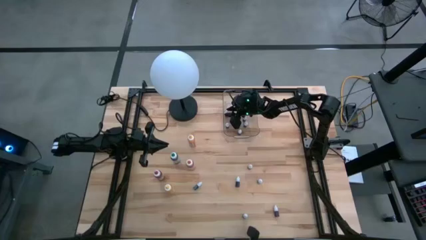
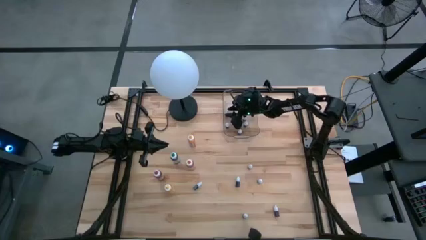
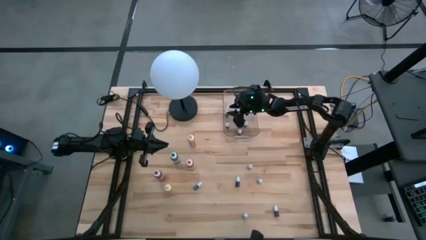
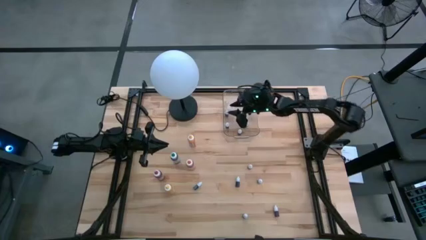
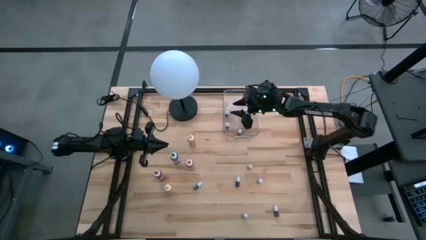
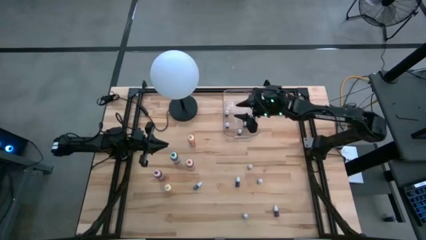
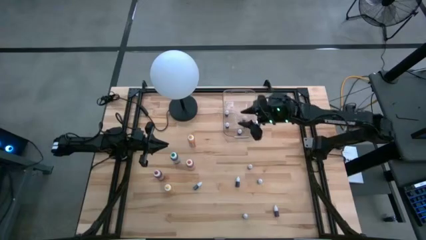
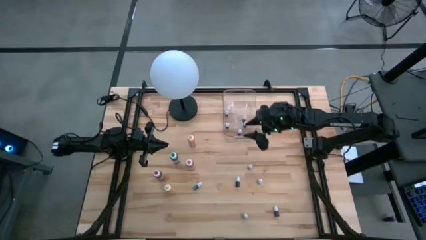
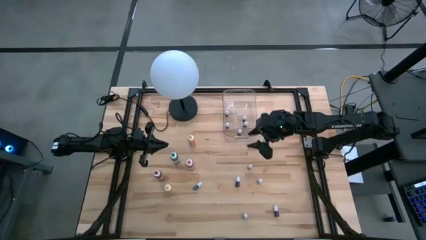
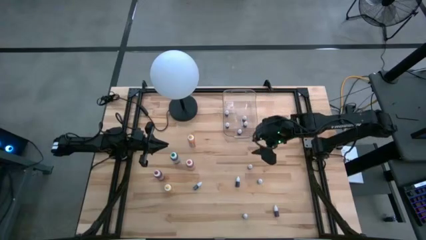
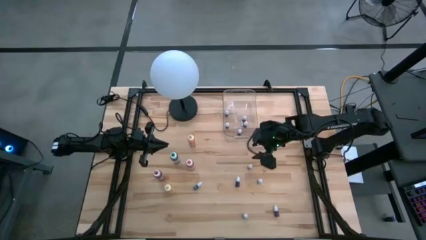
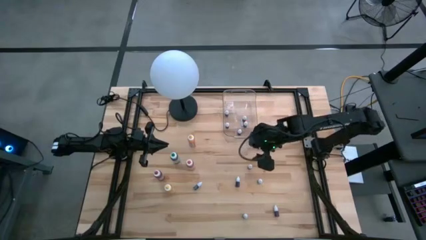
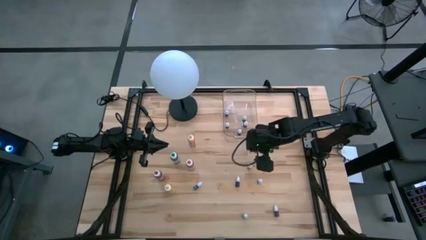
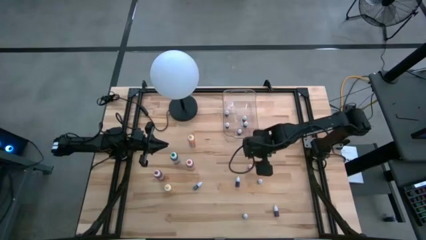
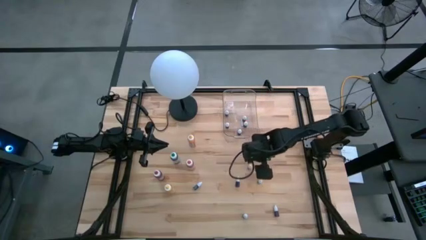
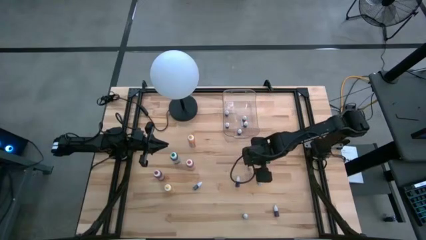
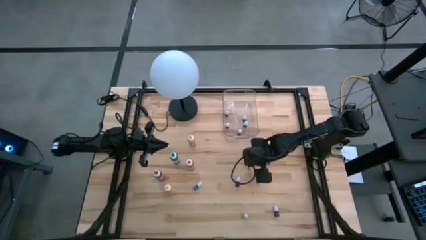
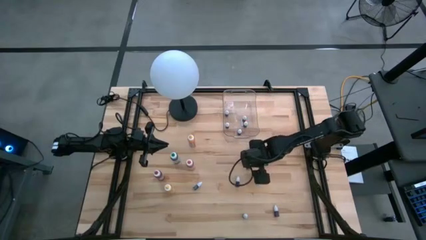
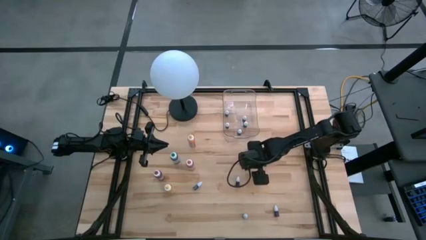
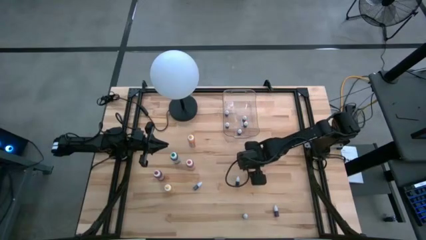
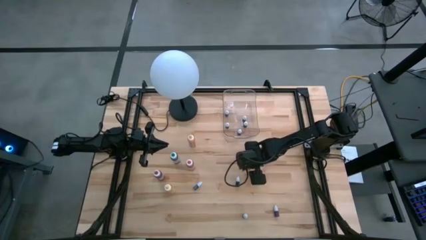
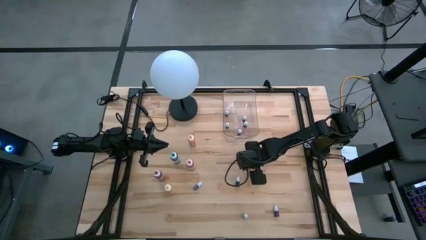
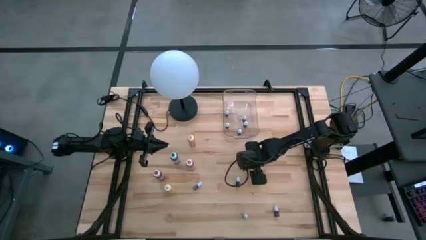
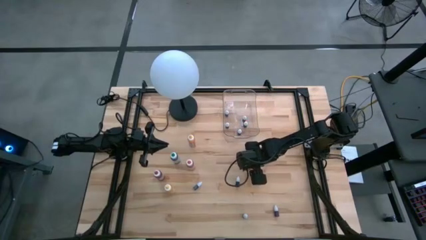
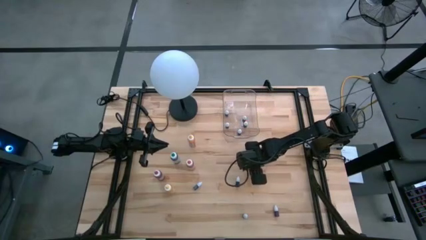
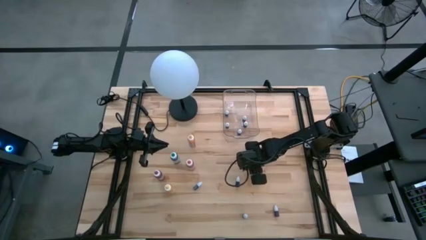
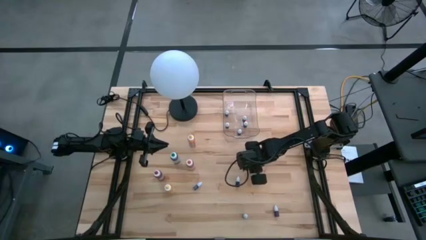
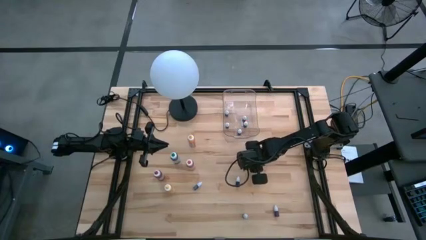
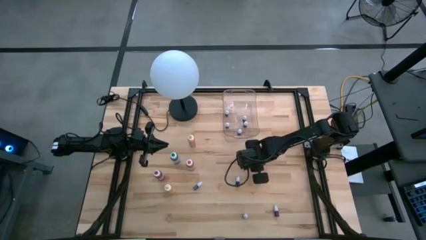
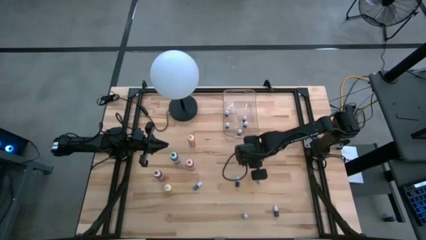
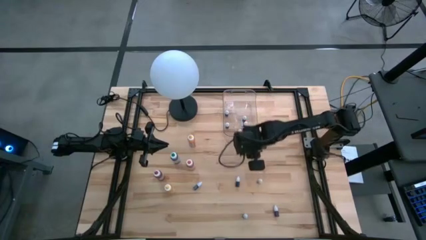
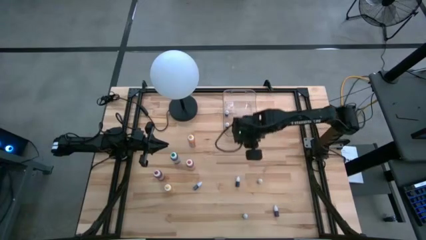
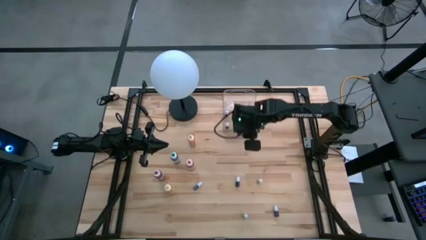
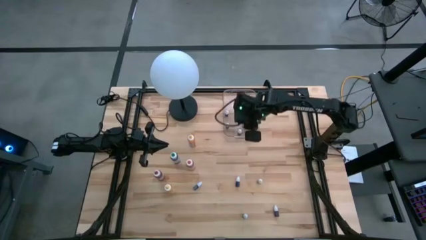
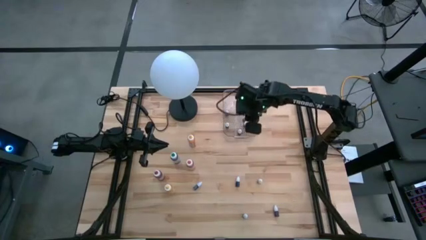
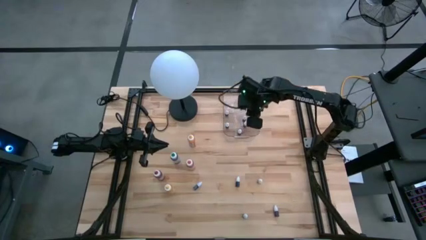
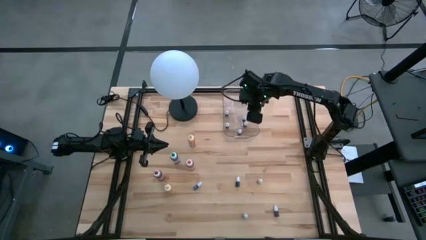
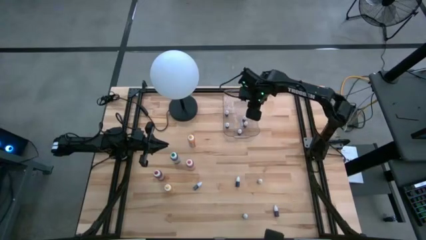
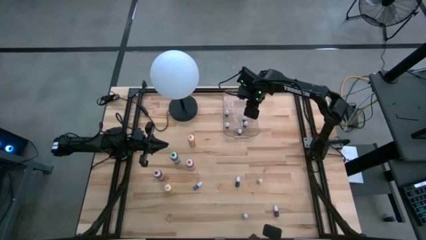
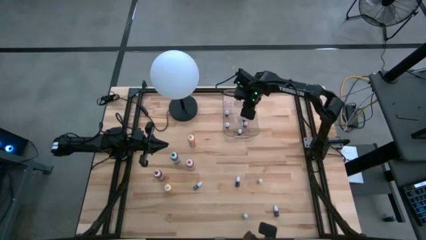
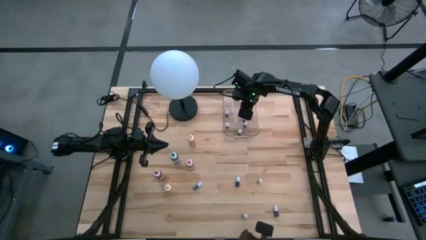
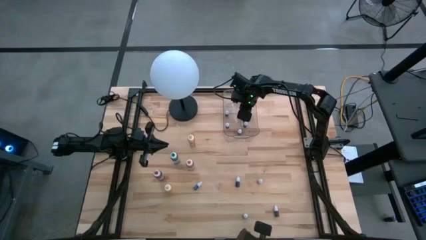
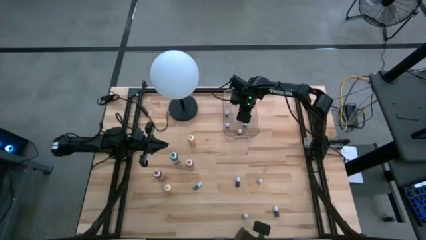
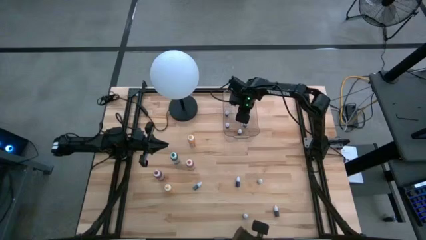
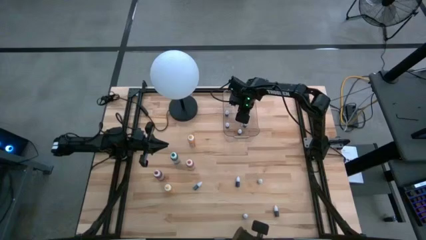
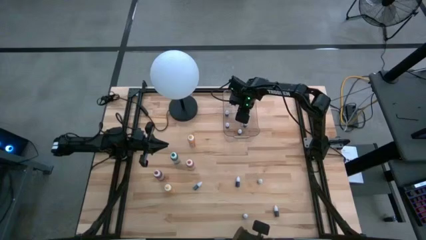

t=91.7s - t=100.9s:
Task: Pick & Place food coloring
Put the small red food coloring bottle into the transparent bin

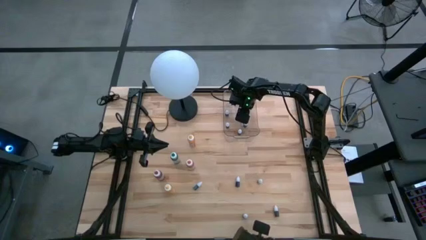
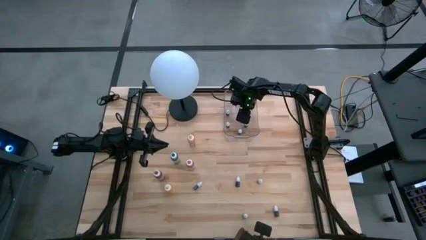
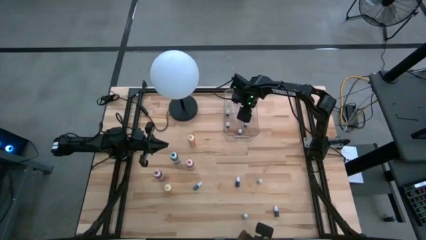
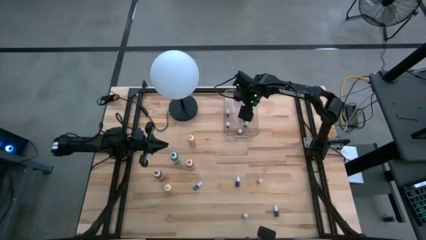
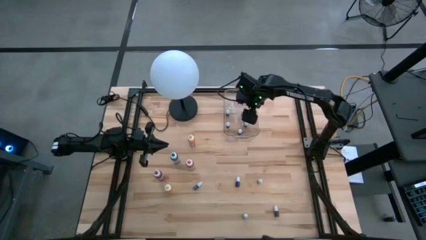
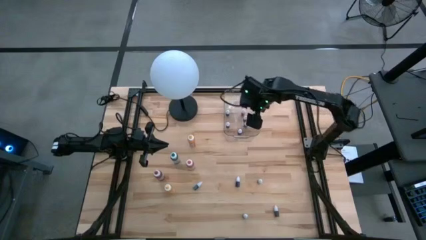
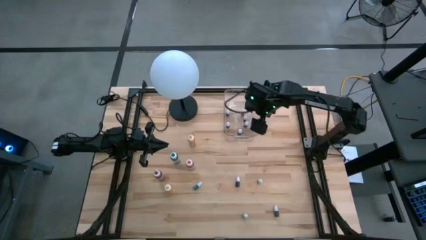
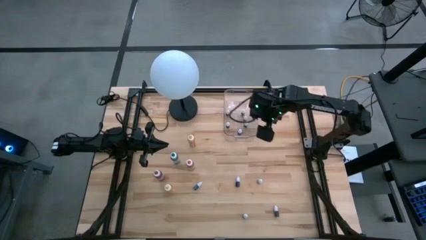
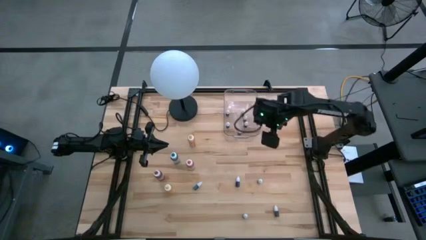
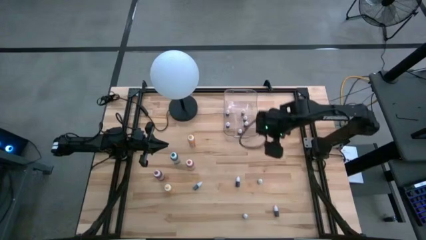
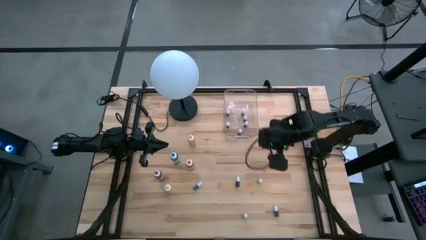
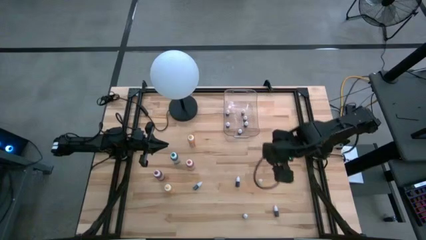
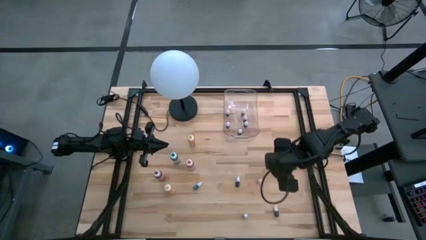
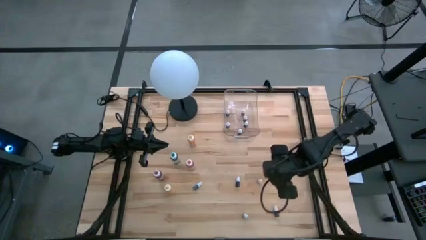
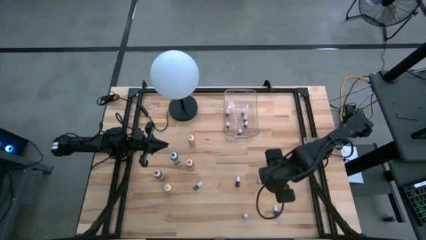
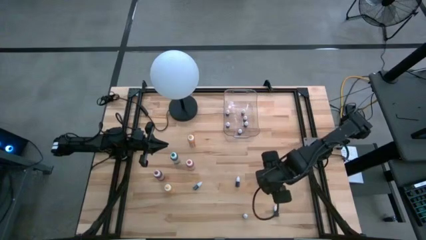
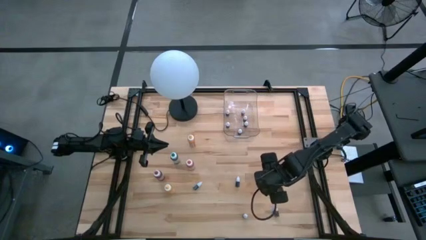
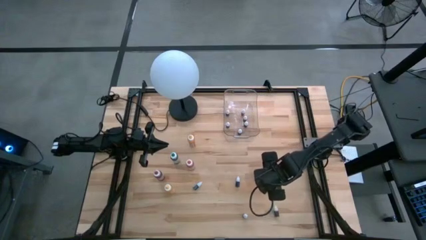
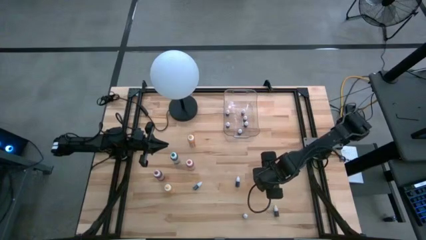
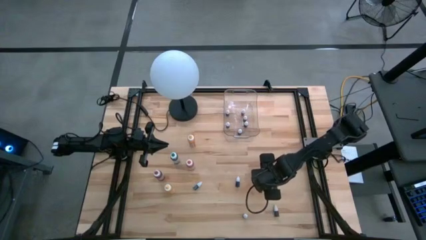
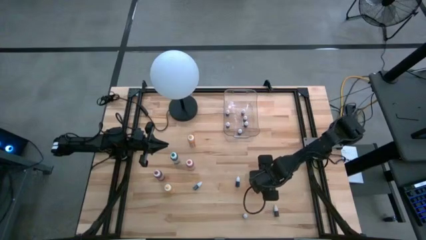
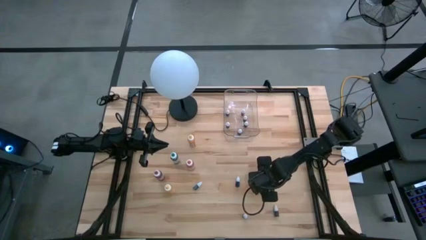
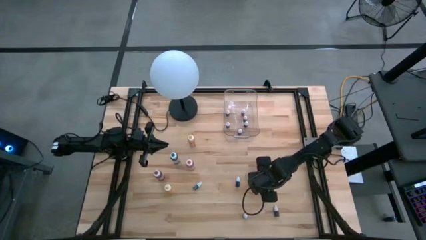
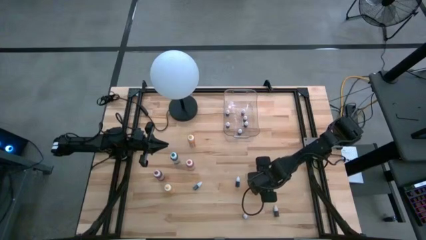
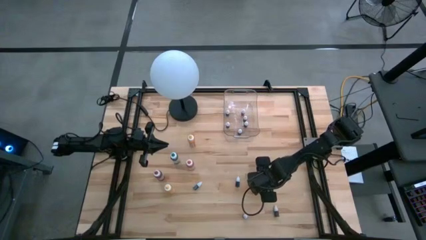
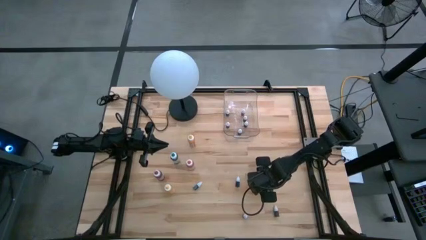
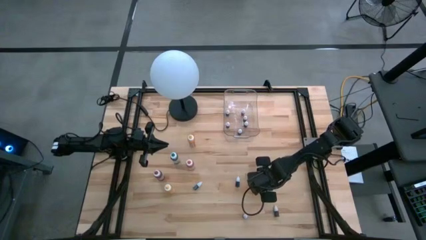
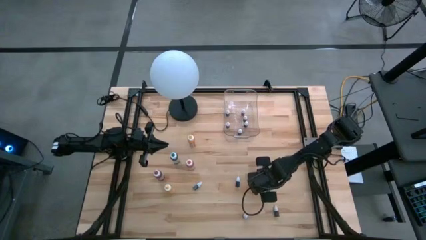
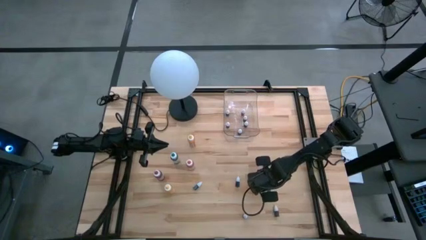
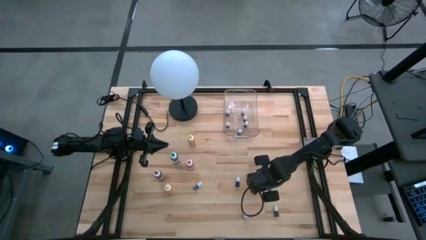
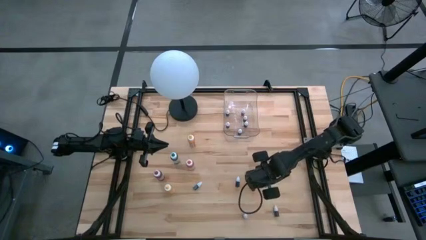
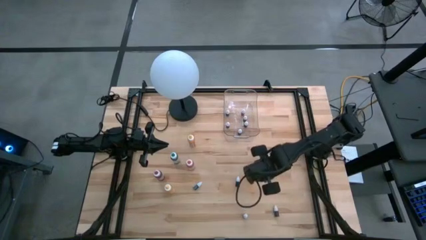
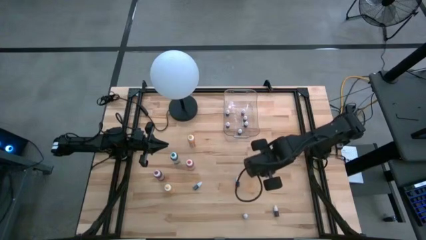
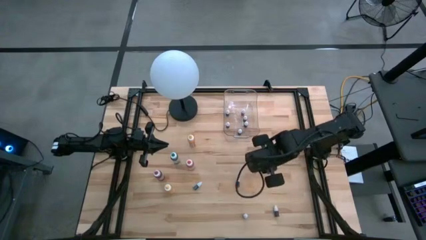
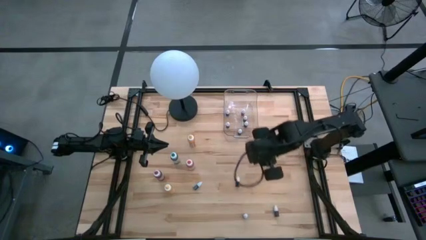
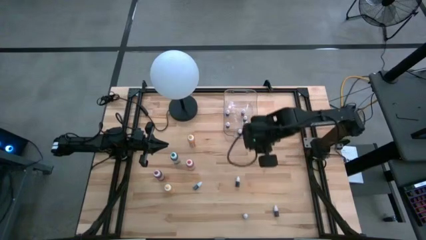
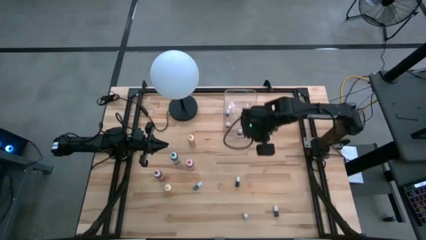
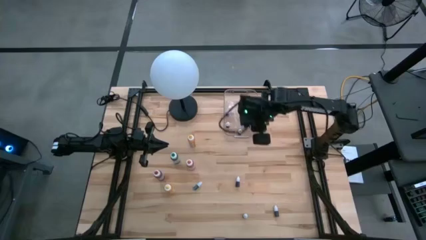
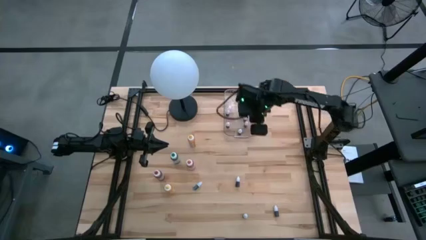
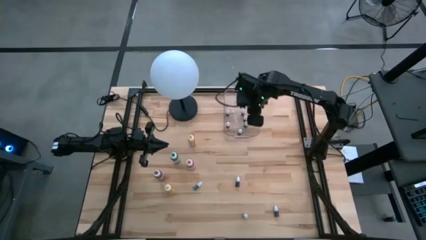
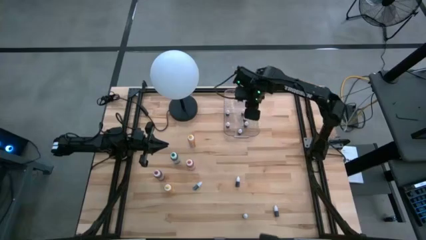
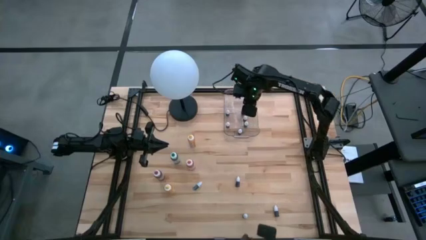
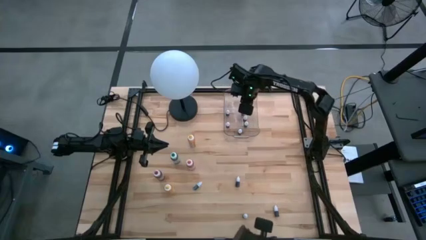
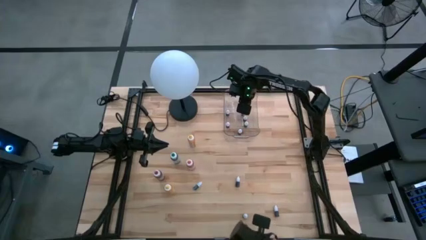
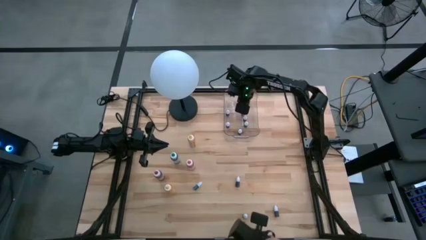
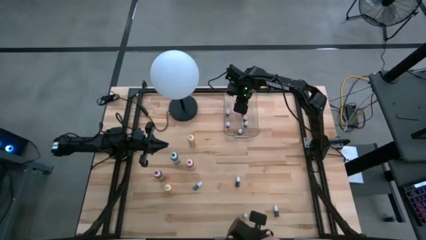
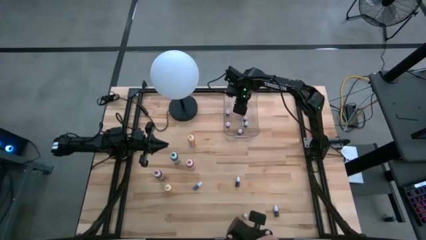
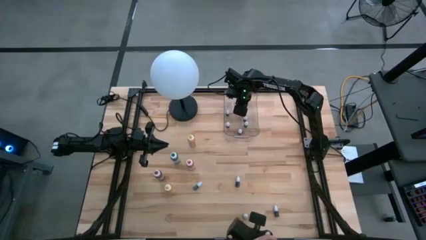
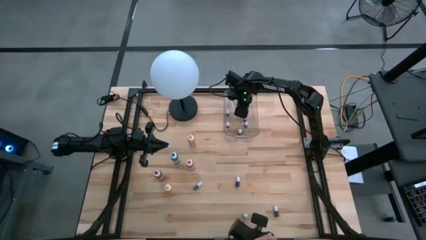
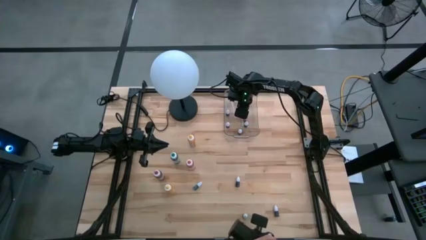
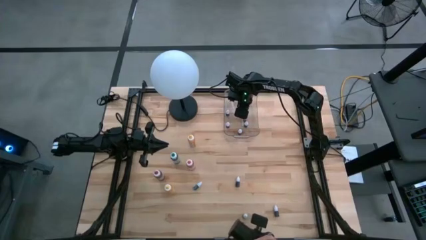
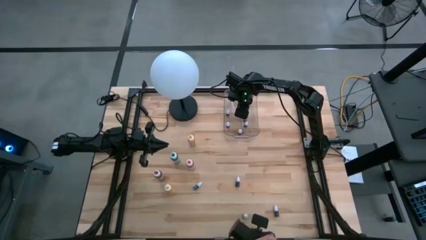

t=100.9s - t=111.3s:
Put the small green food coloring bottle into the transparent bin
